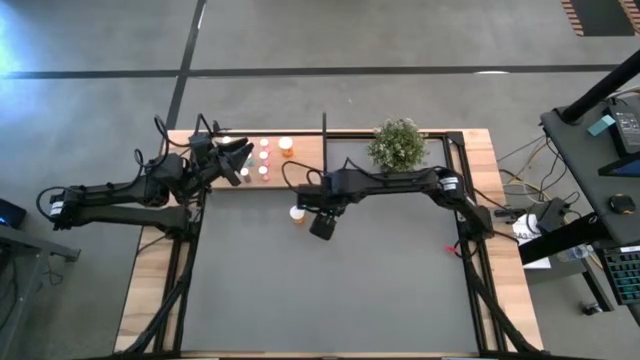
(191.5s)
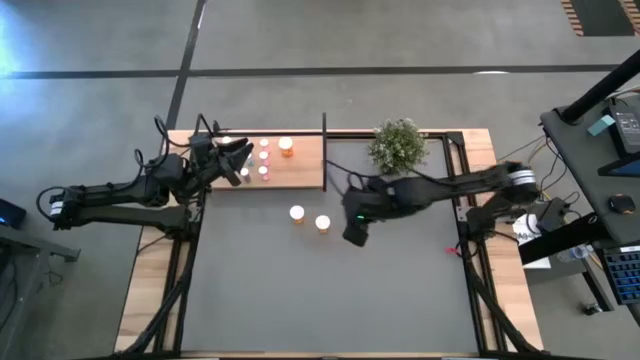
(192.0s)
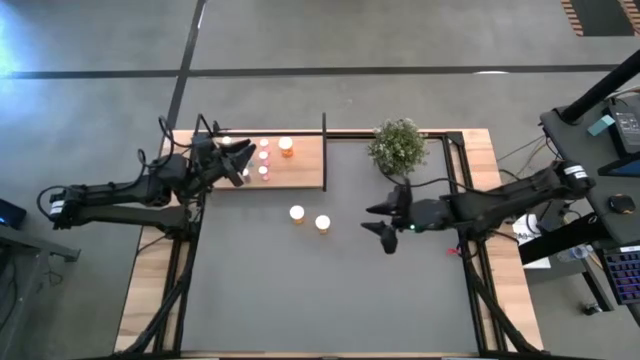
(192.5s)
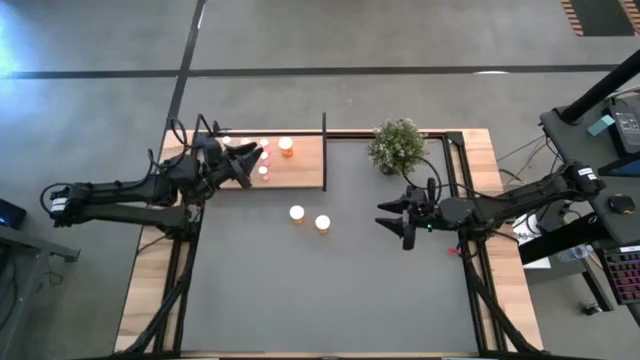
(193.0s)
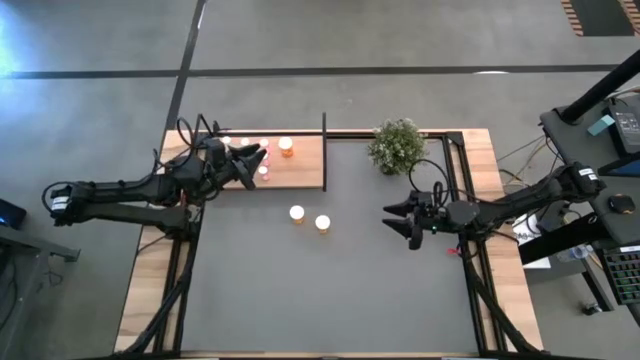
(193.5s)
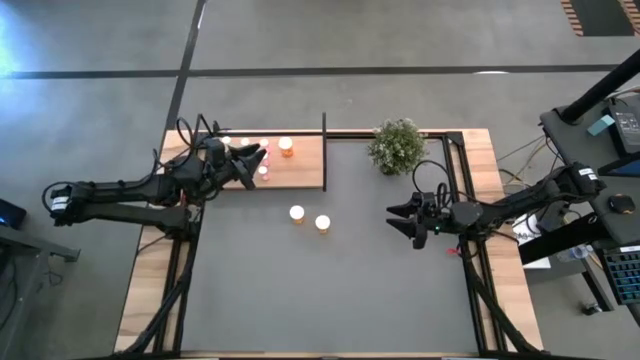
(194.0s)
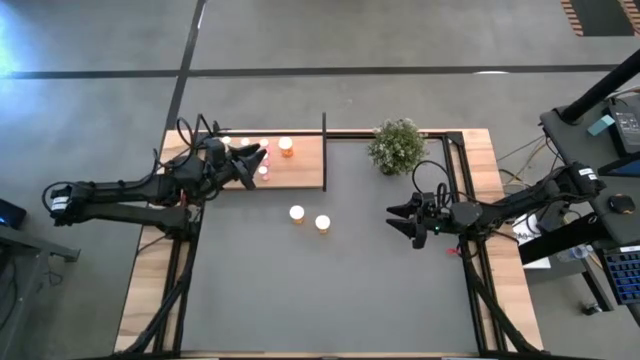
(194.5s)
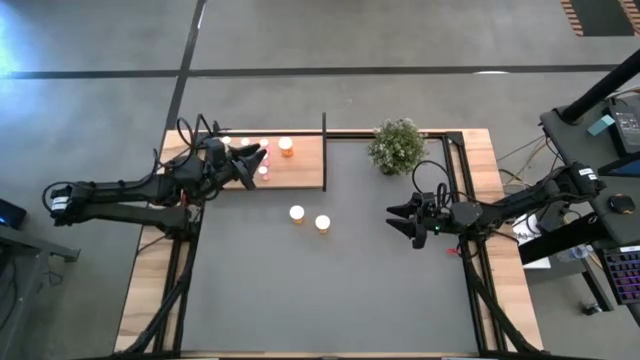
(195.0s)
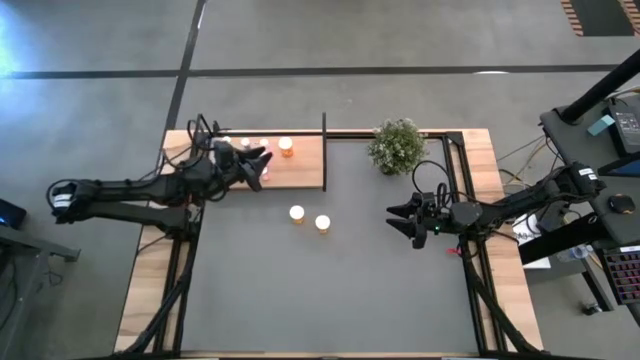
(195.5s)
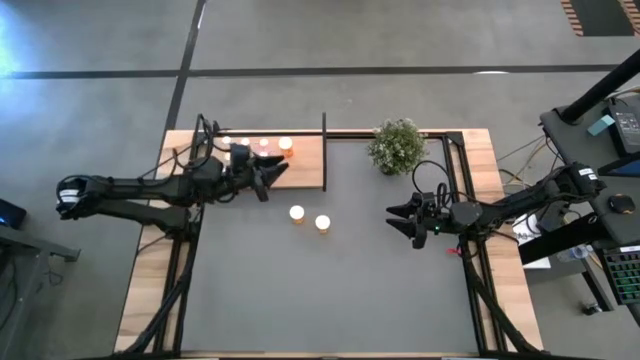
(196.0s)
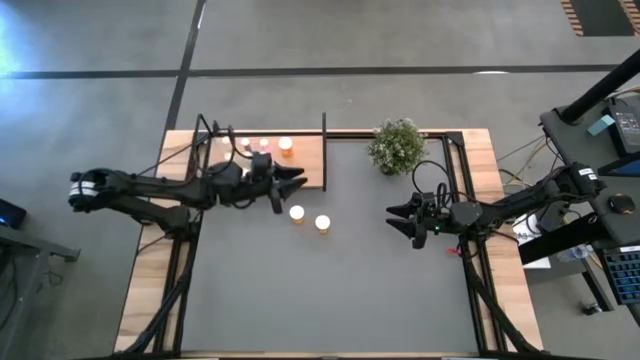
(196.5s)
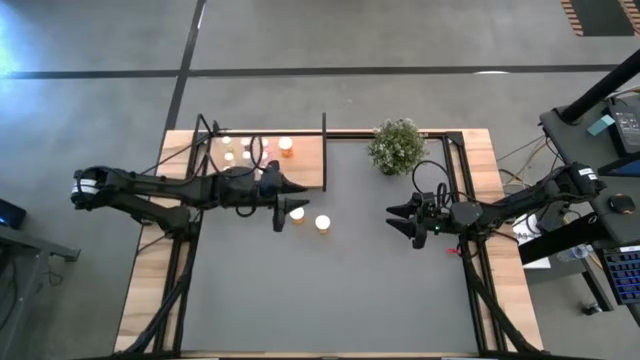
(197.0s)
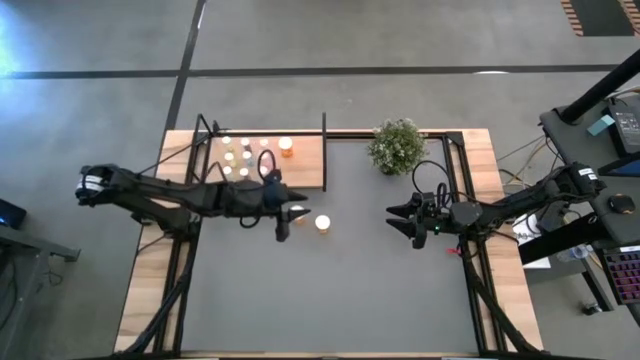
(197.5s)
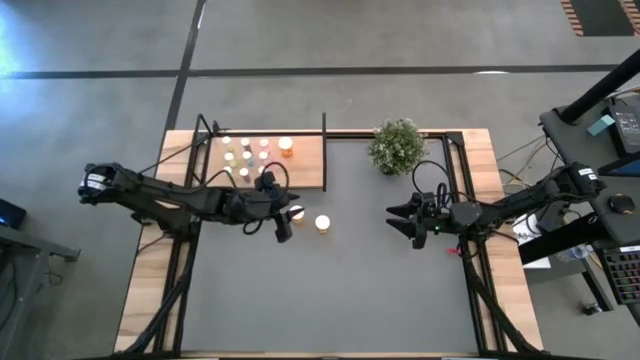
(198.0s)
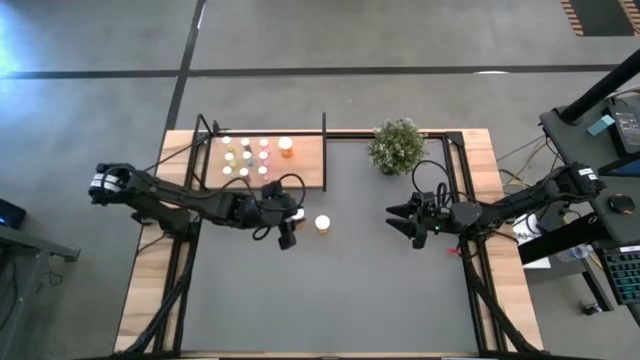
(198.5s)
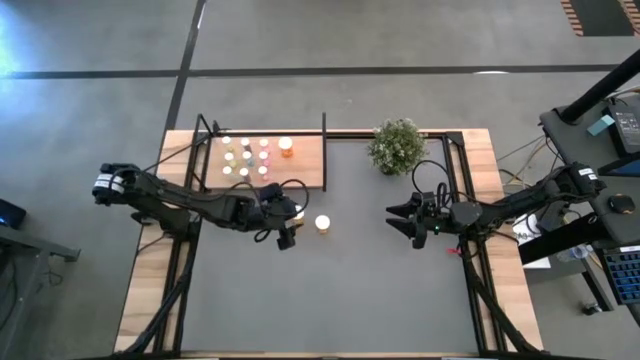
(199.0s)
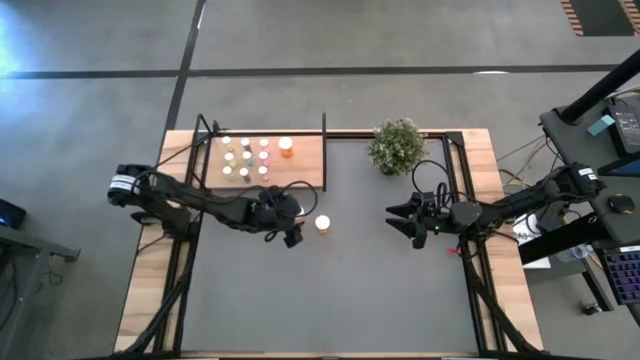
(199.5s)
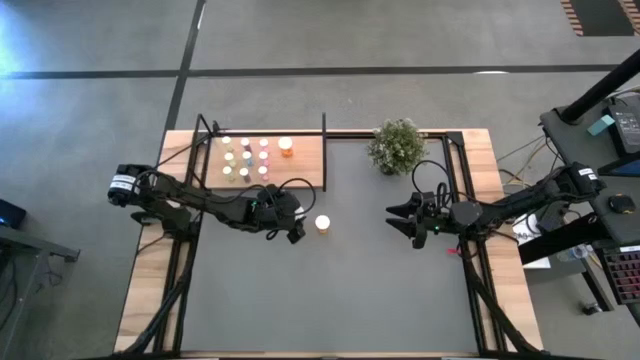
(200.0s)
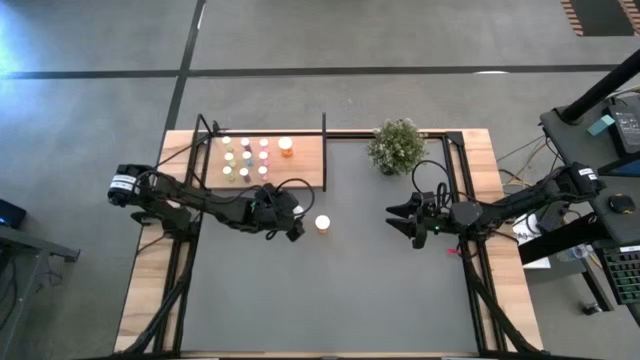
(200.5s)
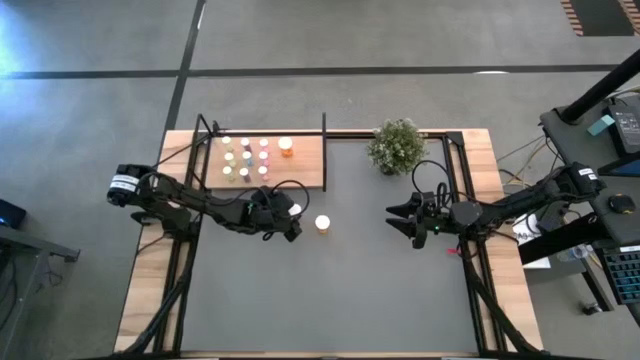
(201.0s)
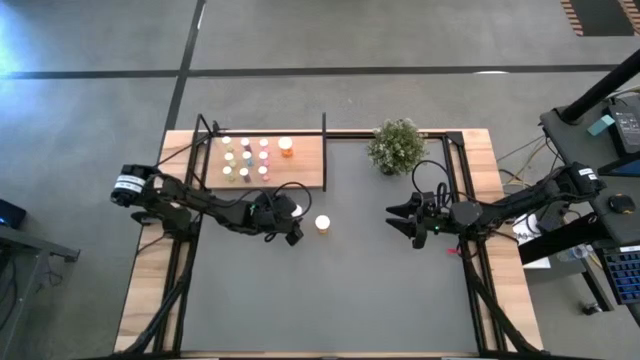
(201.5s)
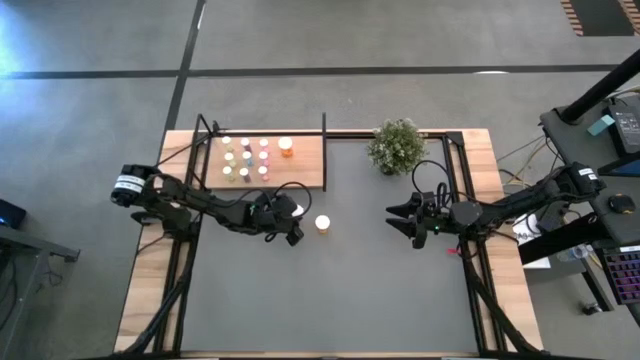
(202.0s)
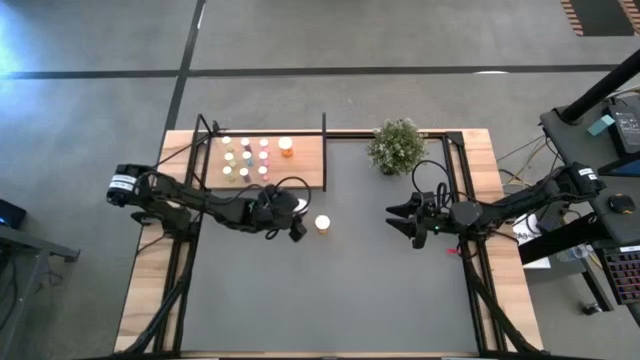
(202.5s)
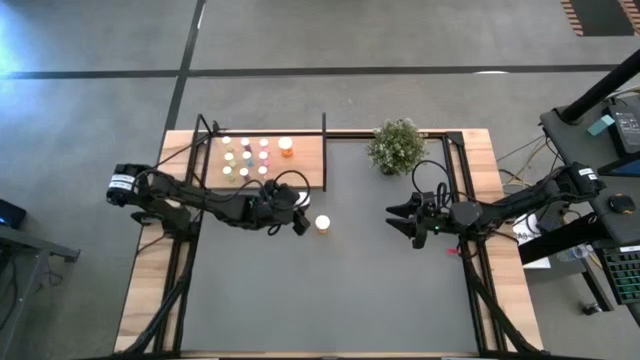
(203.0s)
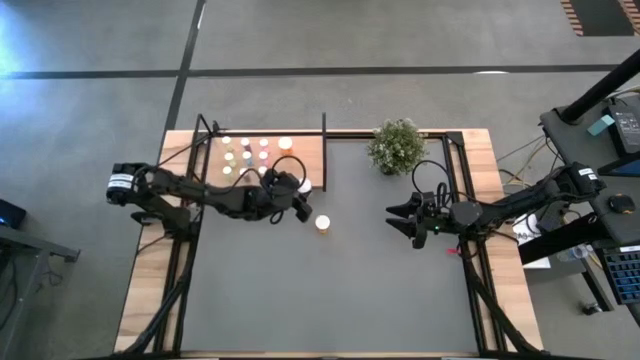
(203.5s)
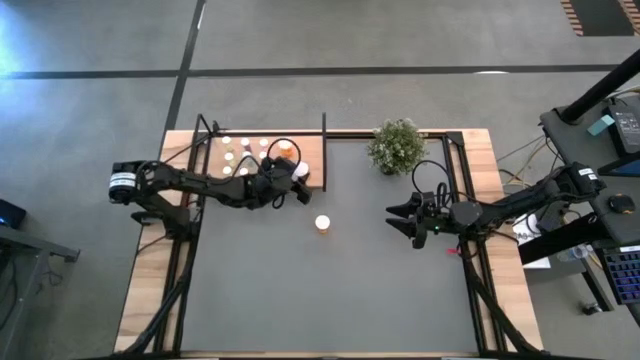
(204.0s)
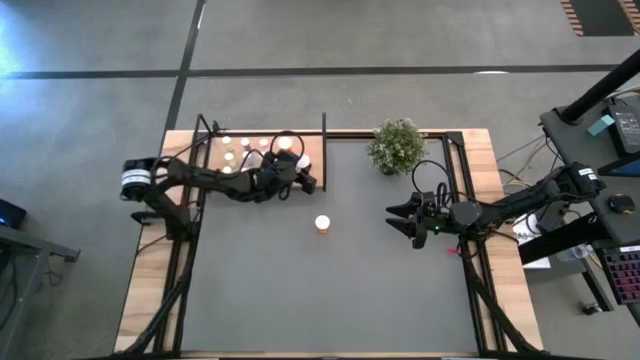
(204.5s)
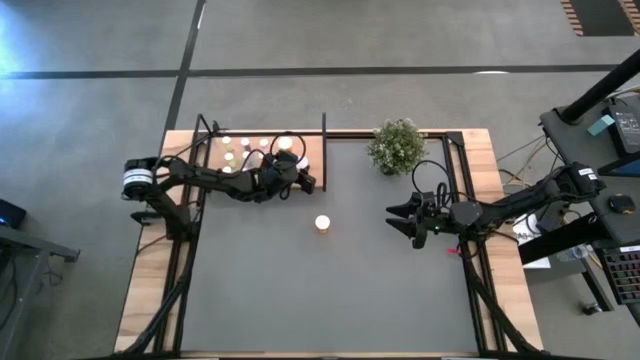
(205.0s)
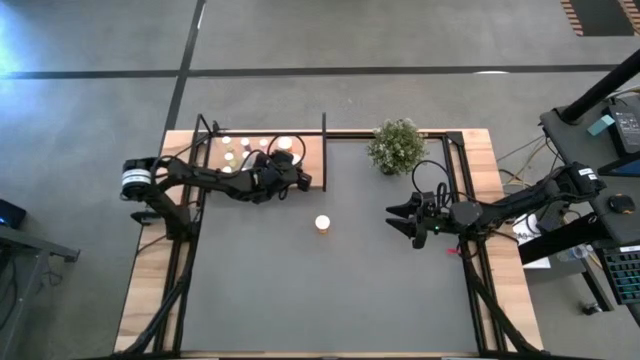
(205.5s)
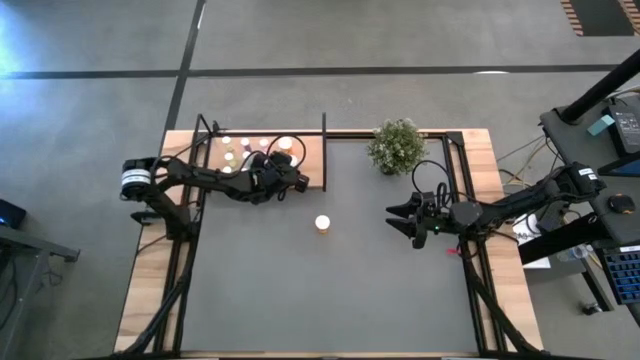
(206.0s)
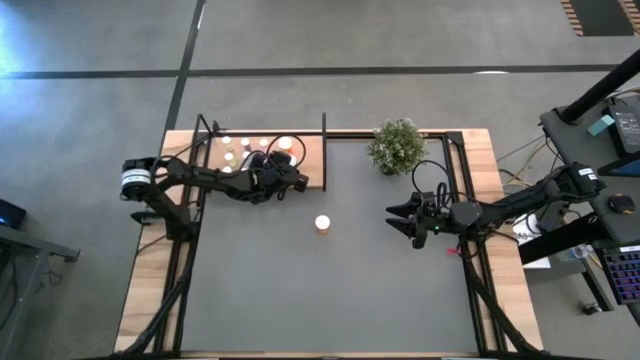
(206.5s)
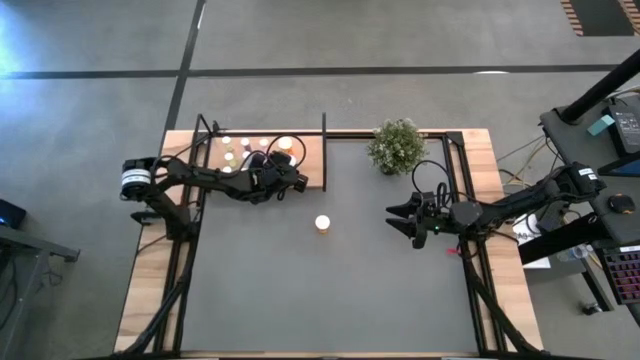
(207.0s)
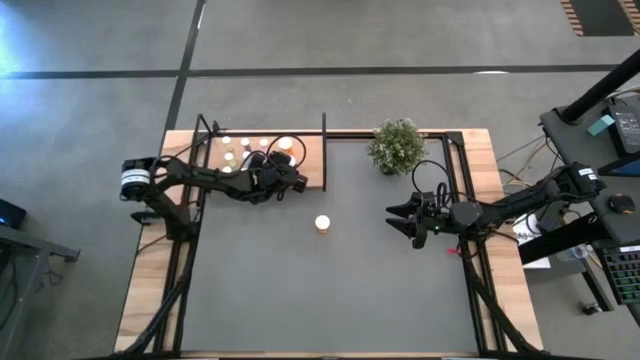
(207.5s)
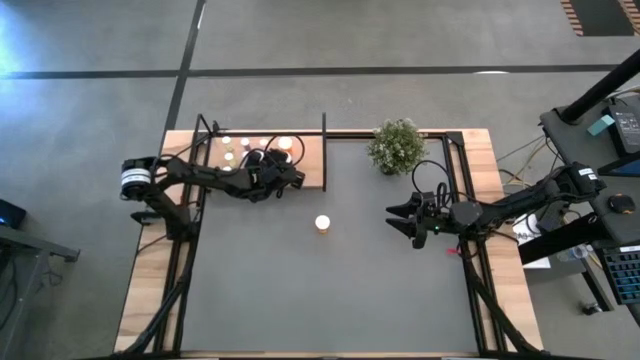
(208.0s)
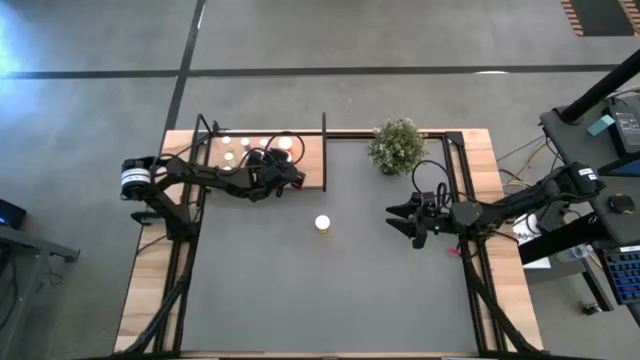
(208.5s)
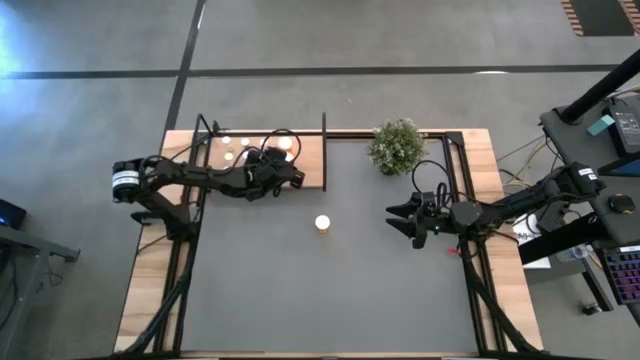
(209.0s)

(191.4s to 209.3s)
Task: Pick and place medicine bottles onto shelf by color
Put the left orange pill bottle on the shelf aligned with the other orange pill bottle

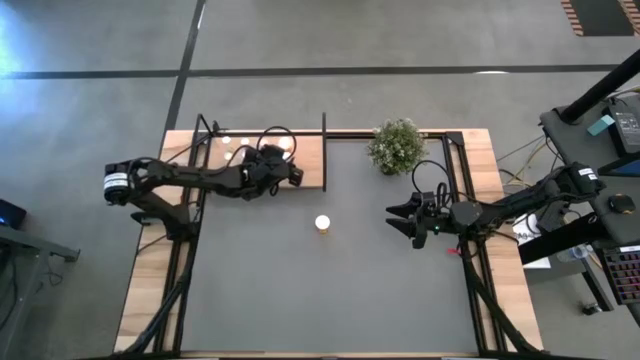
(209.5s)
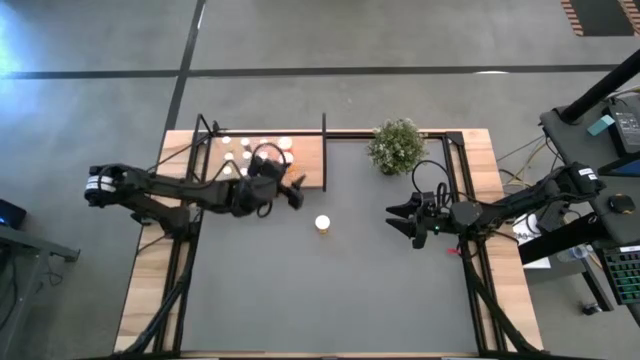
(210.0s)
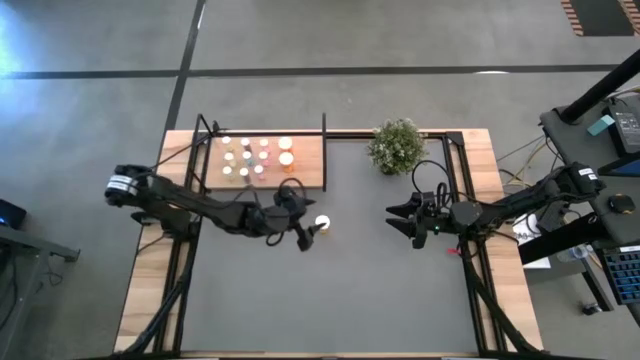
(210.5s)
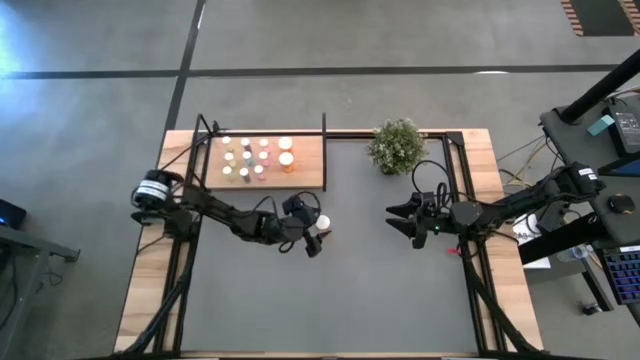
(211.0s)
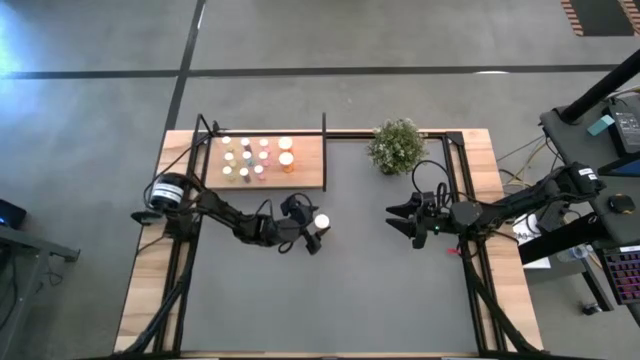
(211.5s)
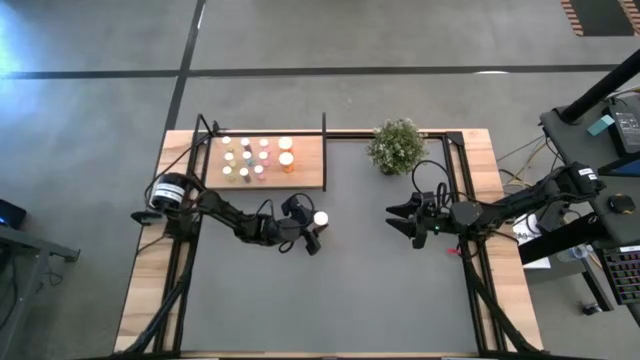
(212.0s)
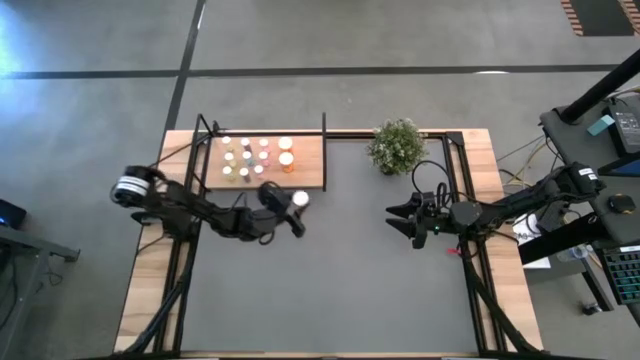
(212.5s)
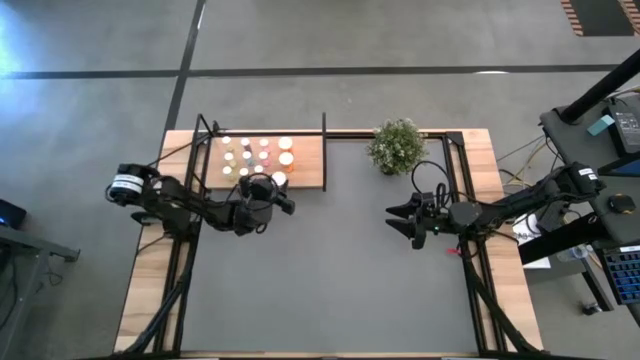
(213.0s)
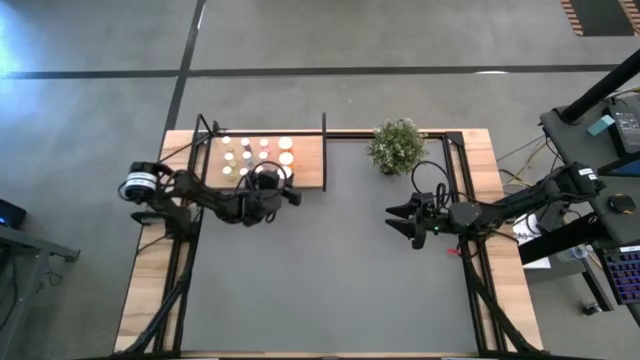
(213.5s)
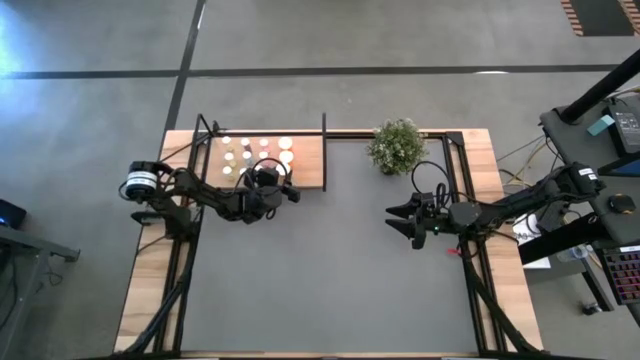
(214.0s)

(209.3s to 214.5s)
Put the orange pill bottle on the shelf aligned with the other orange pill bottles
